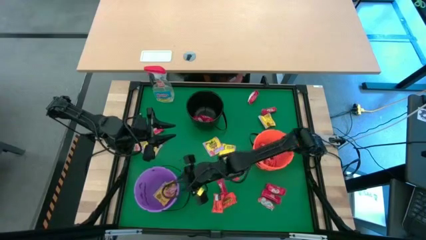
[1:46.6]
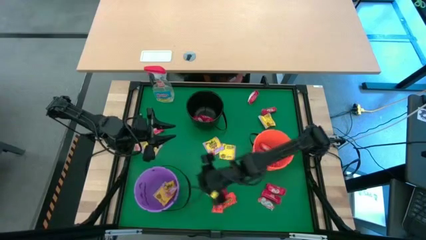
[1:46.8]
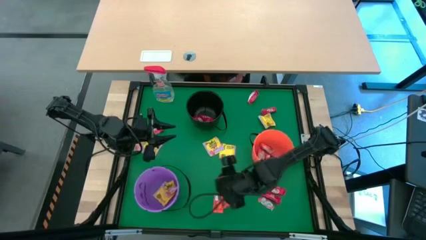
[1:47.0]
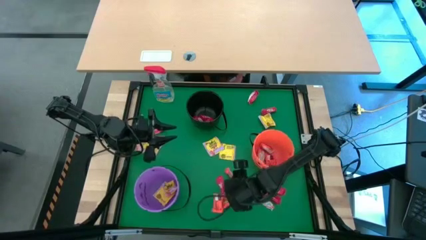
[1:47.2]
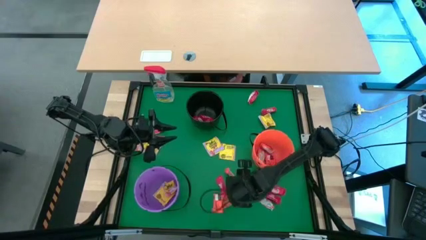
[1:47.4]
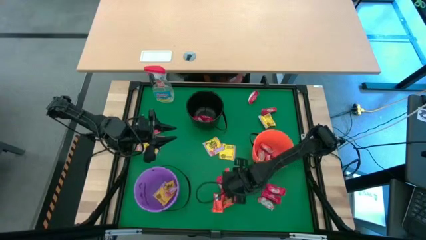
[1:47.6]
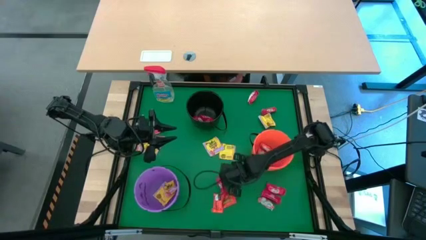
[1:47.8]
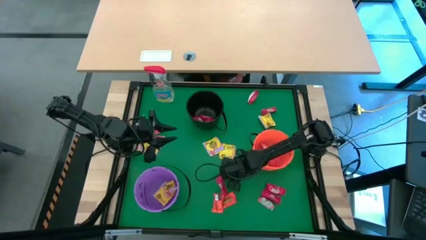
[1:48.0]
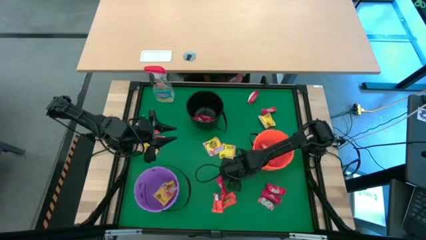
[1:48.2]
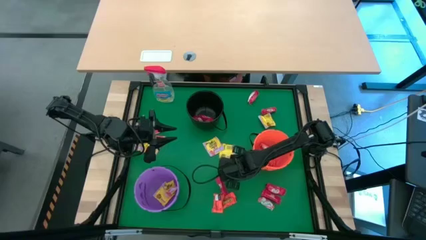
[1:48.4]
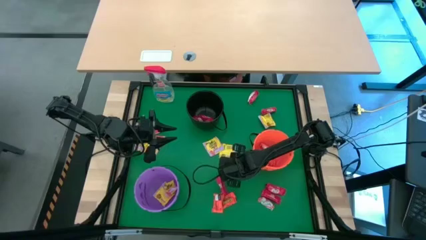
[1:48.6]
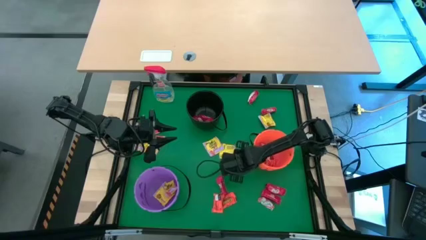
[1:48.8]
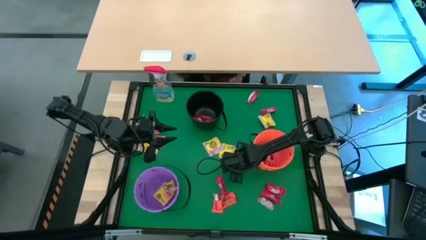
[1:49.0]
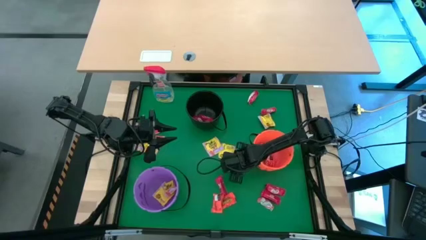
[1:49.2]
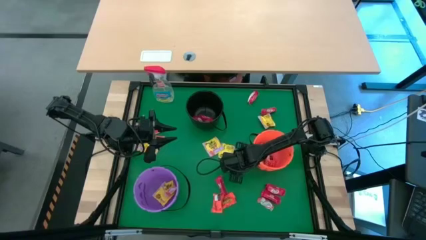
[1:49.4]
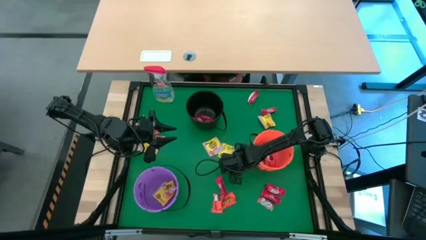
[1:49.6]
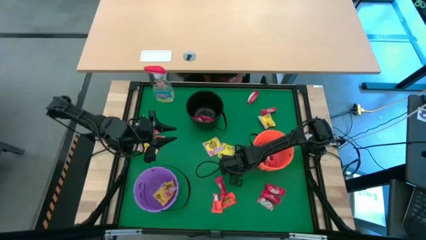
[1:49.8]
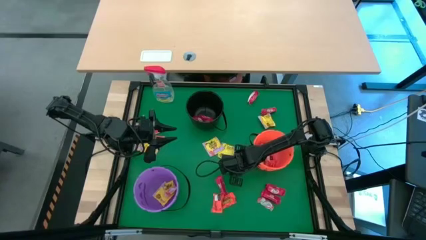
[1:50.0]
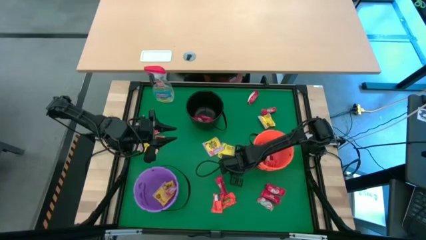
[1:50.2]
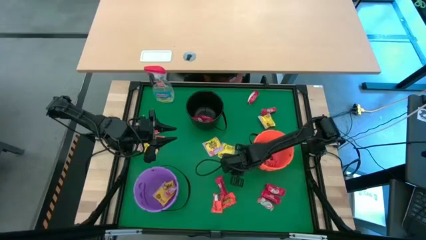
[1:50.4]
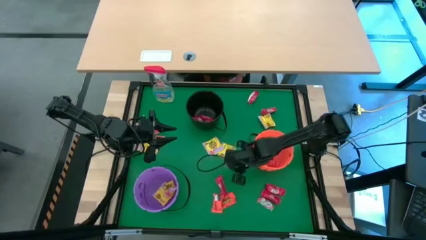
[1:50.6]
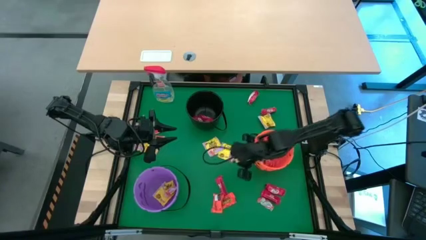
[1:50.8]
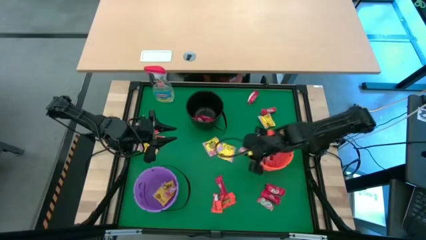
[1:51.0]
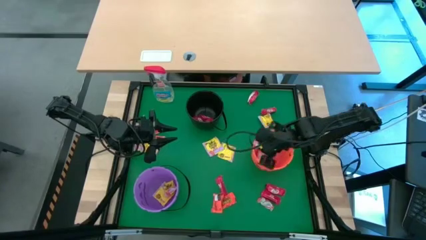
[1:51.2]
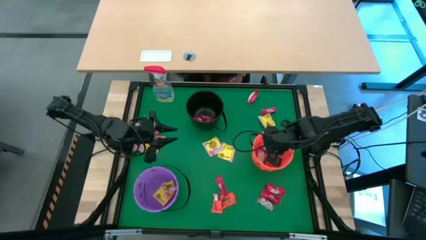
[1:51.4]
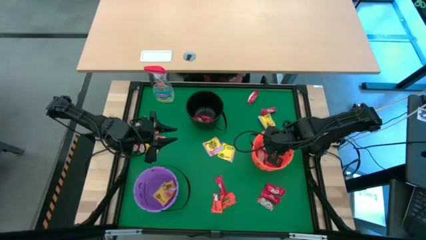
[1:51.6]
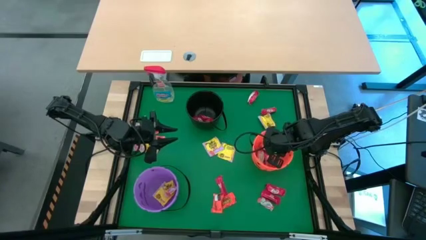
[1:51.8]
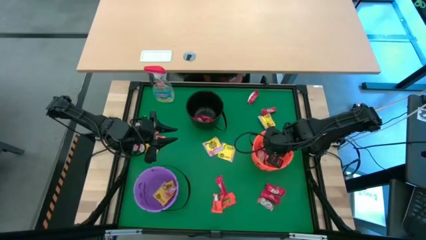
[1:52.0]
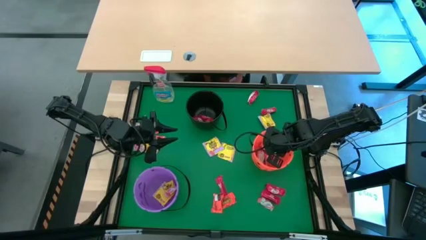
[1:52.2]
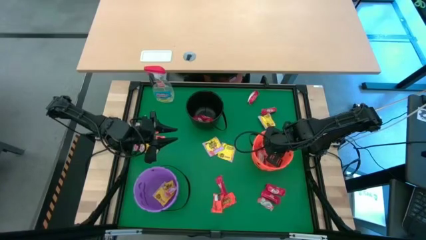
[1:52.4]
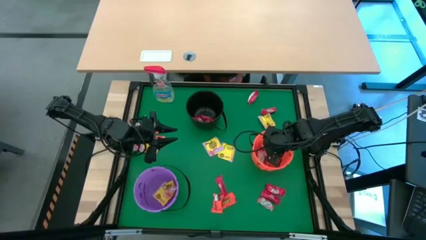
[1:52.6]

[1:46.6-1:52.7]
Task: Sort candy
Put the orange candy into the orange bucket

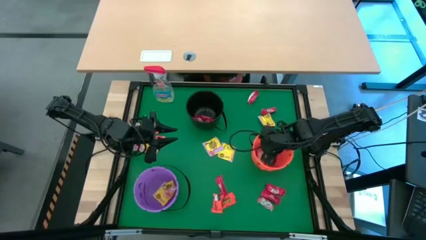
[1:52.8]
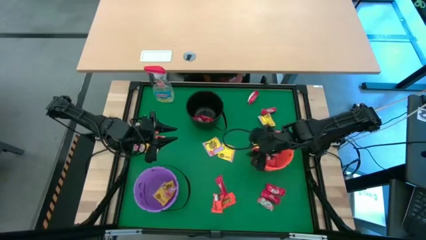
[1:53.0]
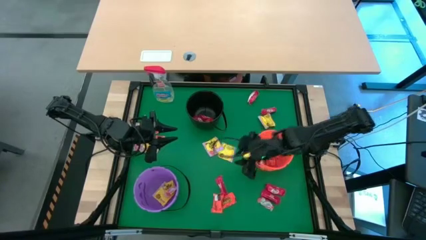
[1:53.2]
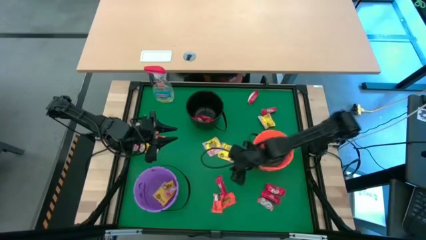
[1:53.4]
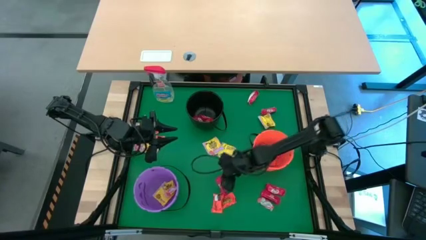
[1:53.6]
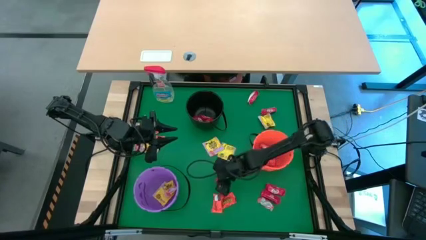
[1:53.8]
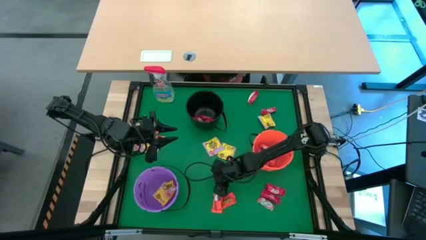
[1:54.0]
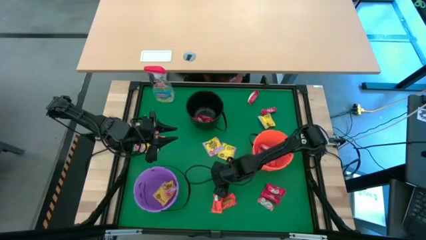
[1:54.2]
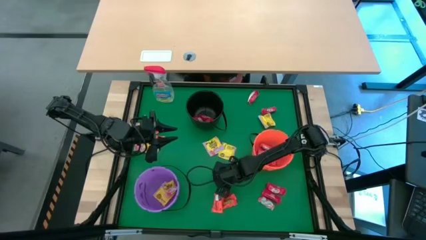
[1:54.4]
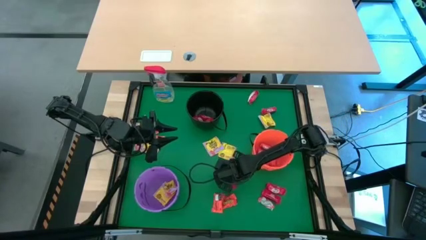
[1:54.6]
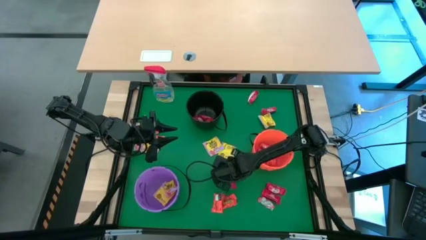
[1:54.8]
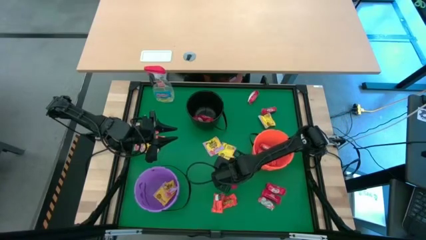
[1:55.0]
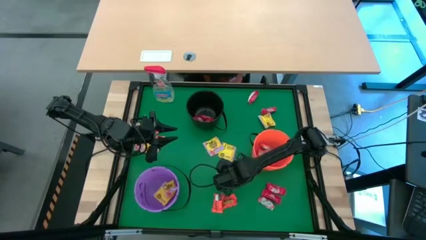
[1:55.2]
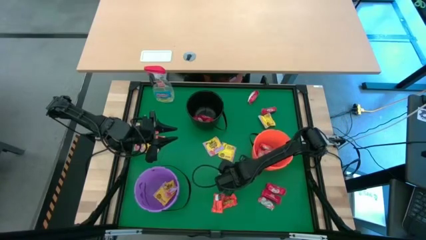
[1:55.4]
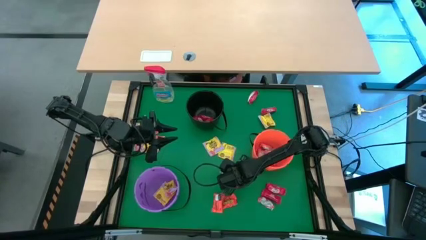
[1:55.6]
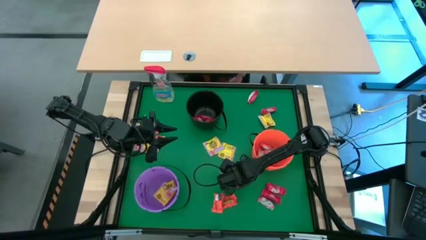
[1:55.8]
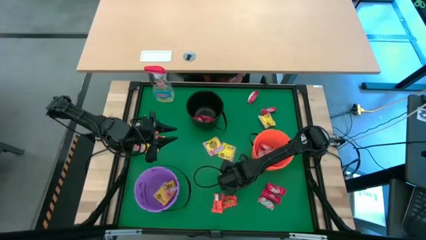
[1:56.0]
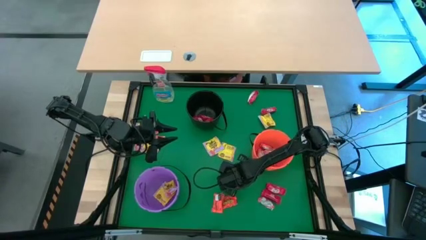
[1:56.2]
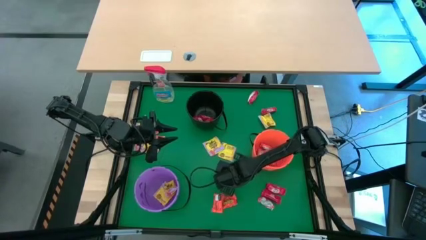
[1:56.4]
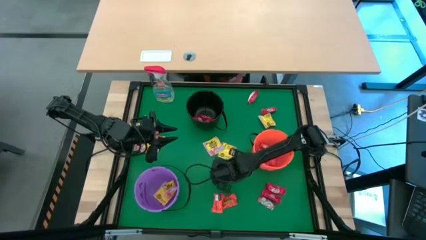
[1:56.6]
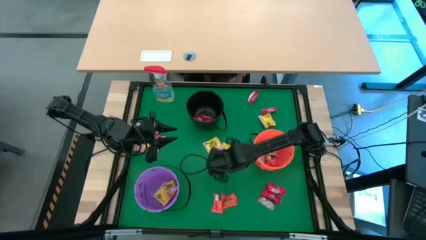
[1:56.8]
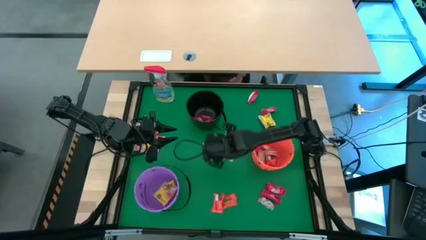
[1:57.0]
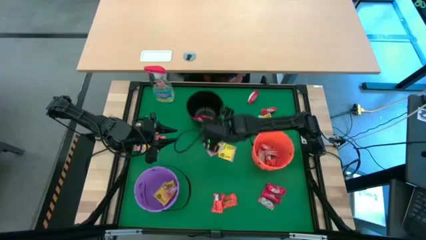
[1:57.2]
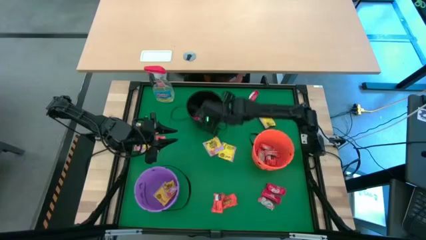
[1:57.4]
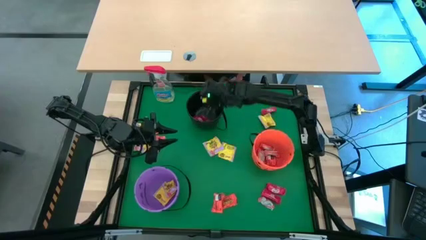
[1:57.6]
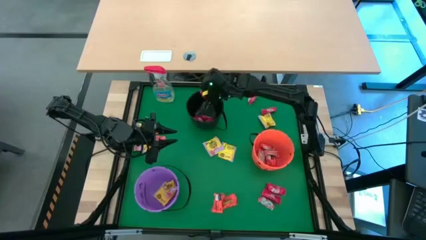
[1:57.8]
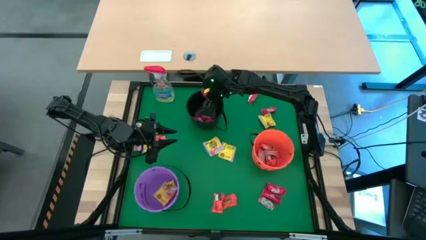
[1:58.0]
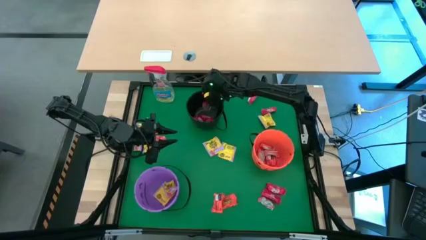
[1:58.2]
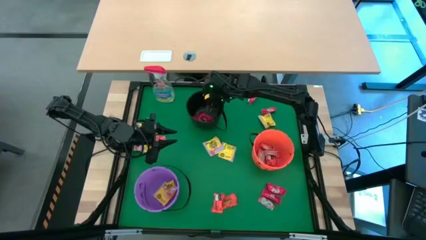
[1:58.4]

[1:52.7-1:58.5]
Put the red candy into the black bucket

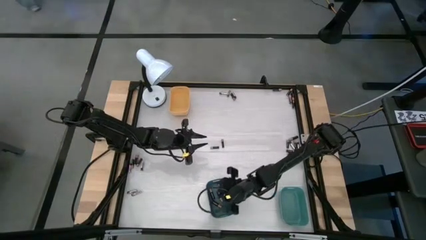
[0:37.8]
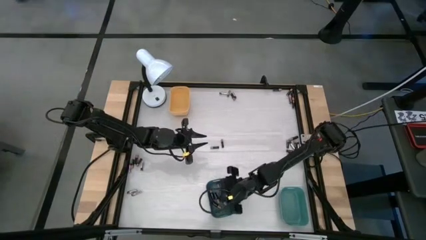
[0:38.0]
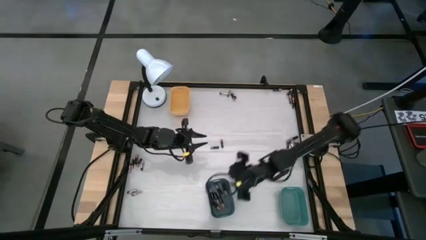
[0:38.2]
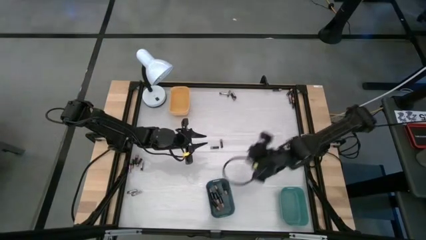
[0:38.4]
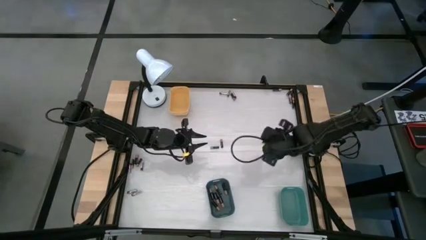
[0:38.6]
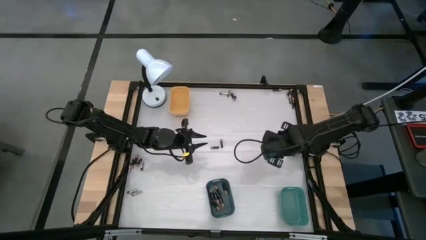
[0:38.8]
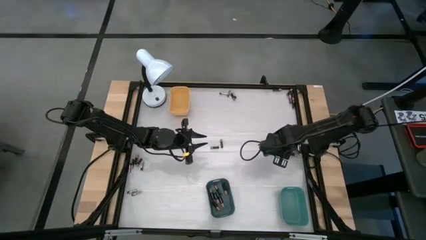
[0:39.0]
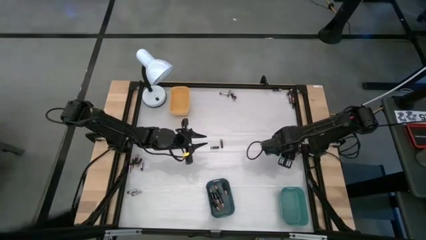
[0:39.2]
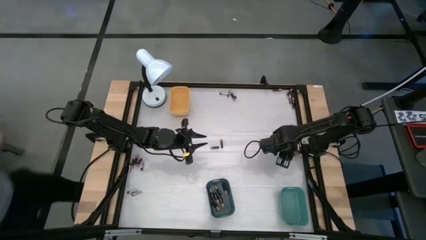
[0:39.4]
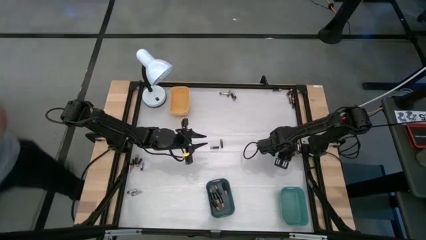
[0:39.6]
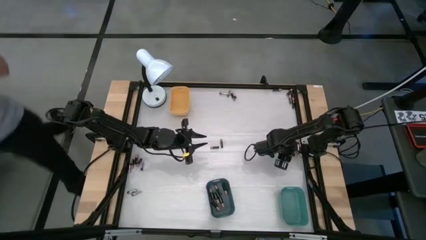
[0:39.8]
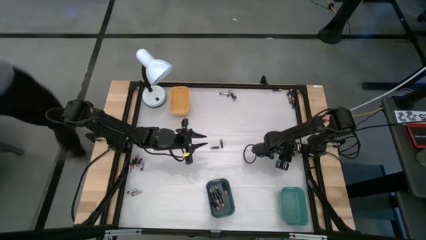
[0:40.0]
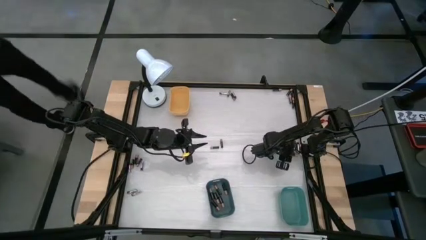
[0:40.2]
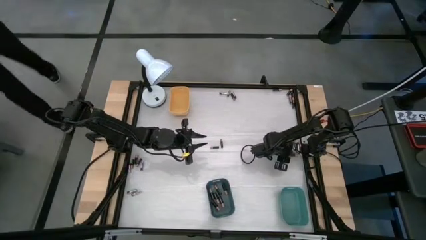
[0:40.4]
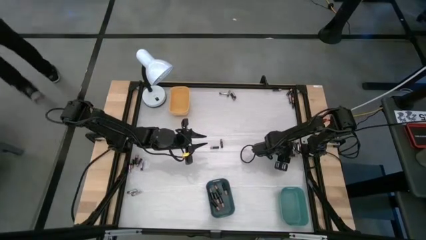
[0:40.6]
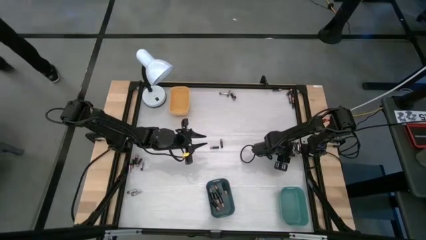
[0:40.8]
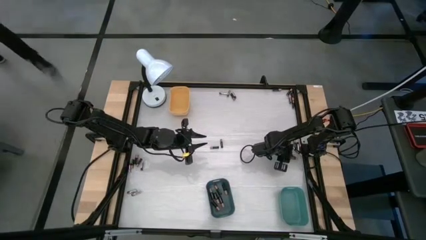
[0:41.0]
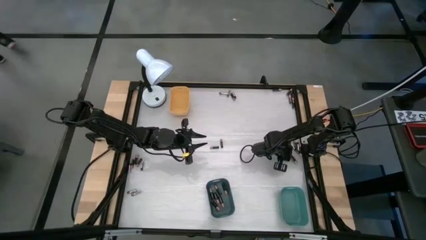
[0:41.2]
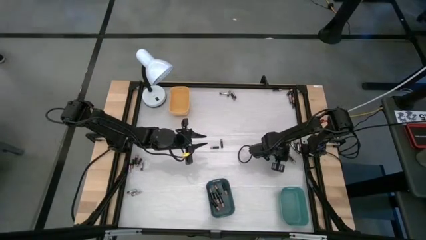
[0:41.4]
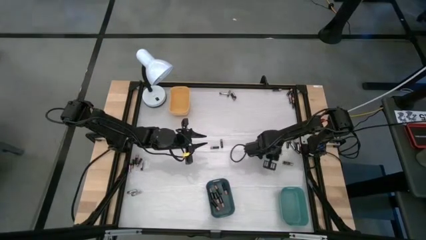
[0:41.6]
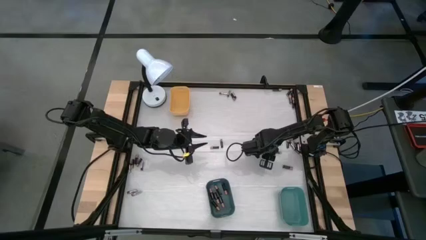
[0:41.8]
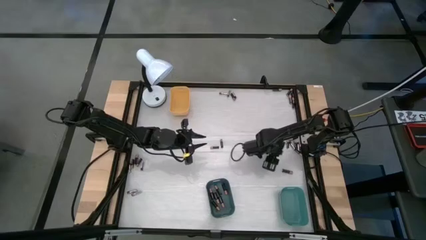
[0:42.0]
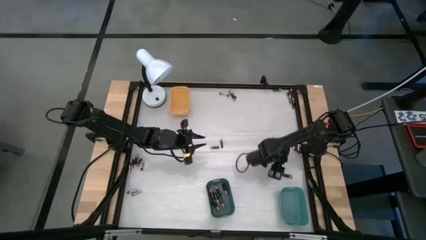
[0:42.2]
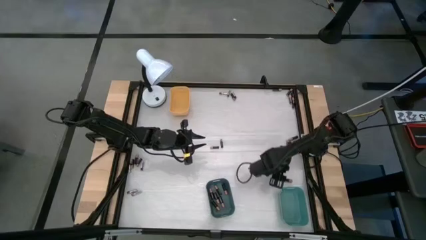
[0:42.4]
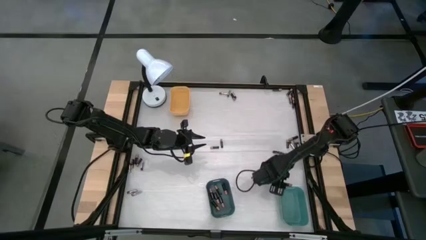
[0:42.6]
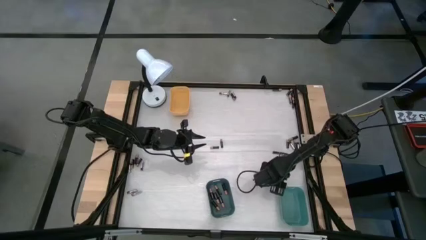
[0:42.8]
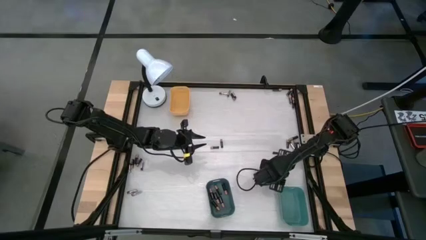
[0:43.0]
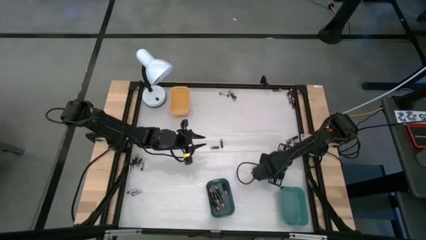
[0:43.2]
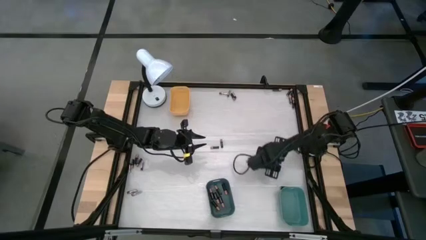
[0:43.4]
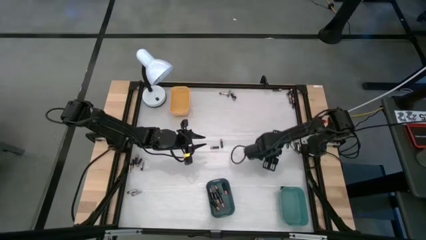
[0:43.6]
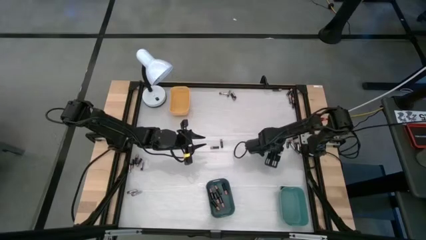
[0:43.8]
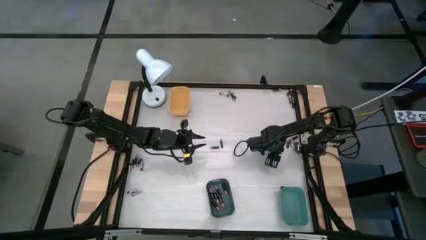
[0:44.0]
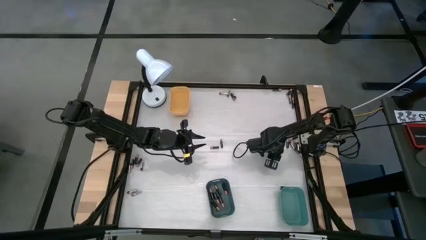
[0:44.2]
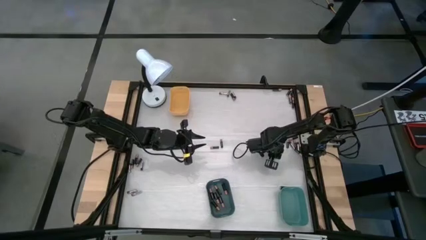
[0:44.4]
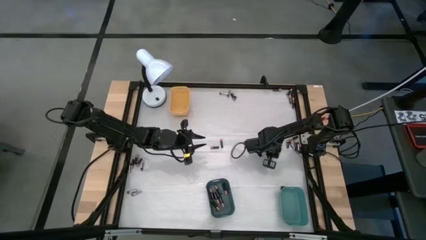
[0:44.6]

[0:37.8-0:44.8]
Task: Sort batteries
Put the black battery into the blue bin
